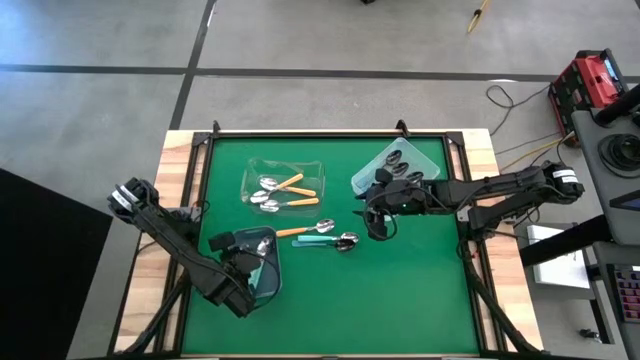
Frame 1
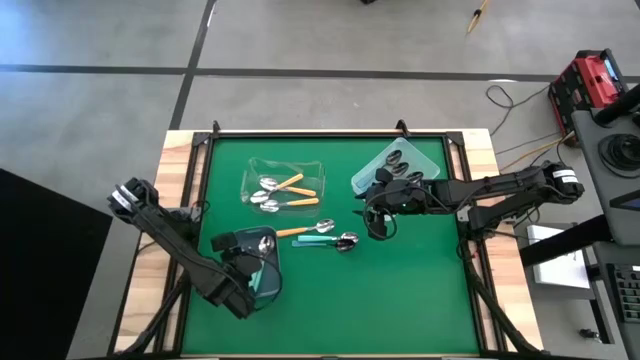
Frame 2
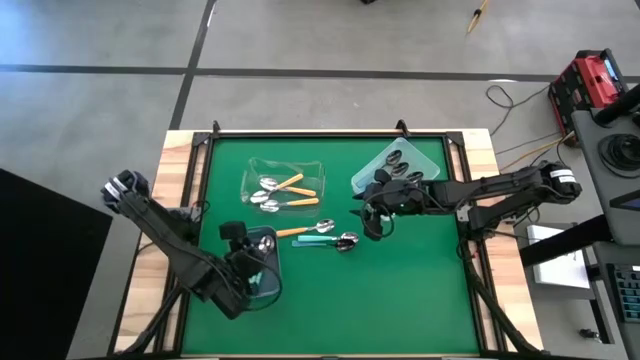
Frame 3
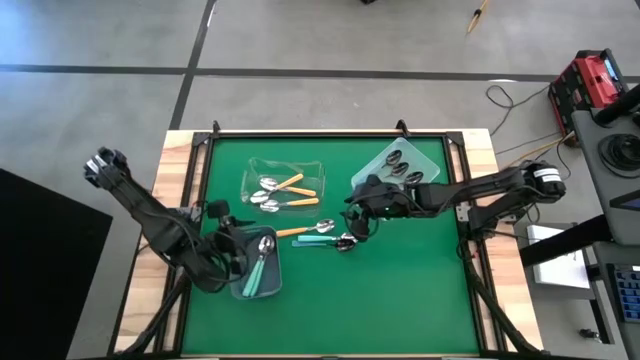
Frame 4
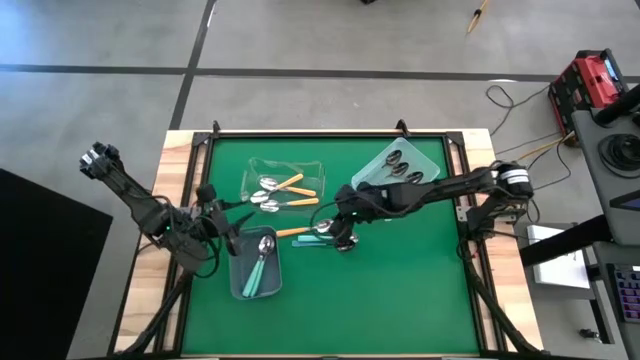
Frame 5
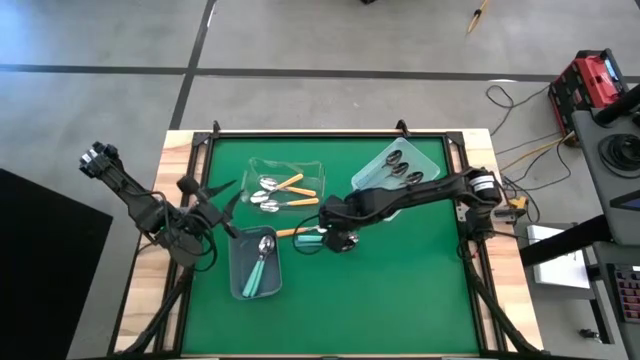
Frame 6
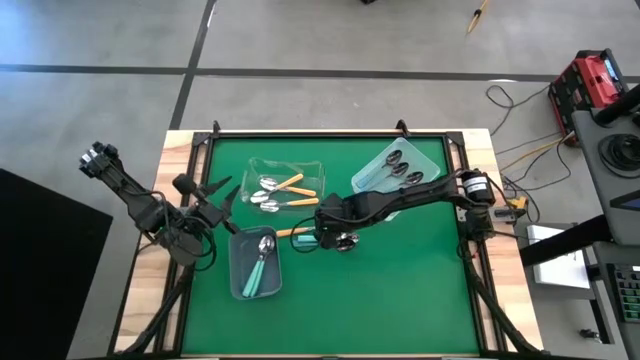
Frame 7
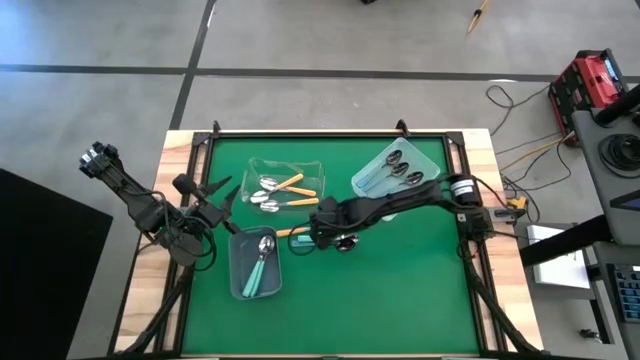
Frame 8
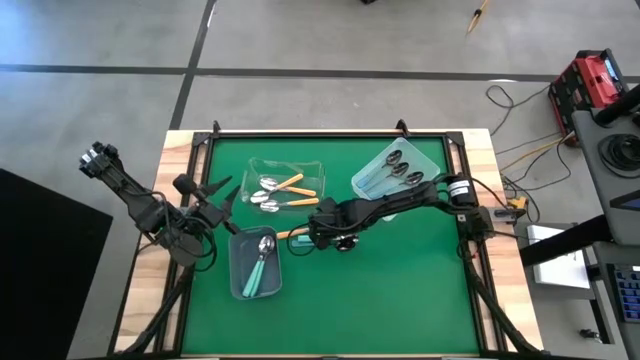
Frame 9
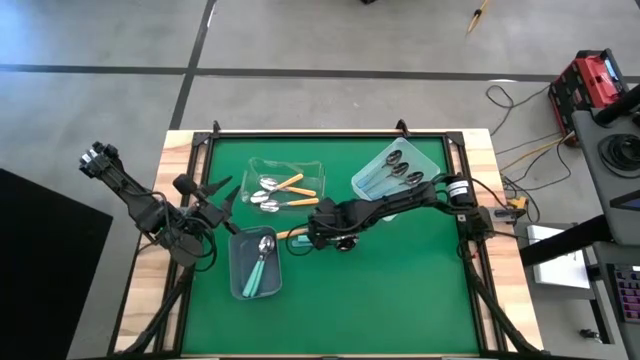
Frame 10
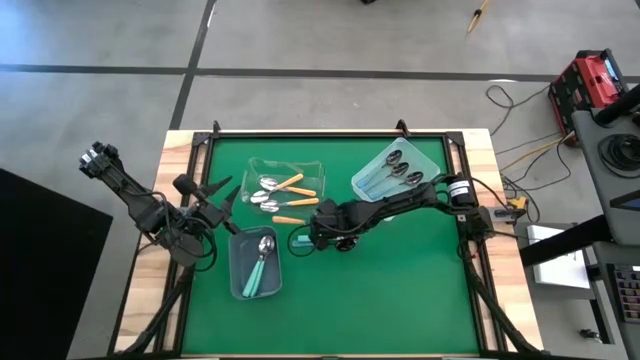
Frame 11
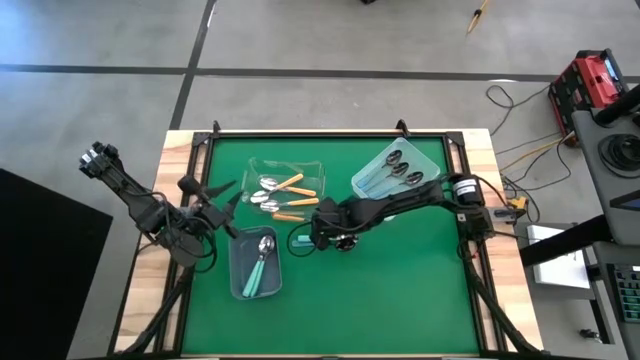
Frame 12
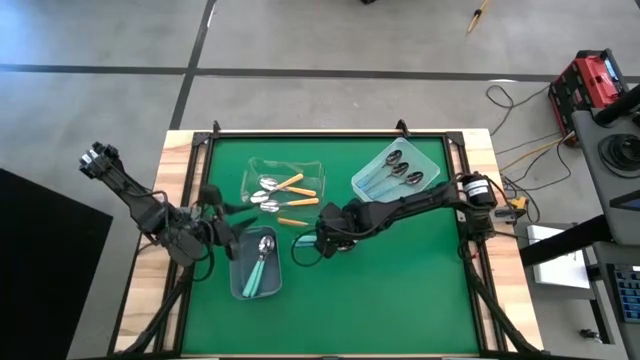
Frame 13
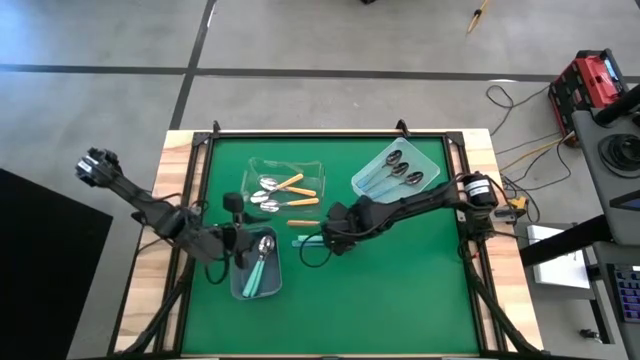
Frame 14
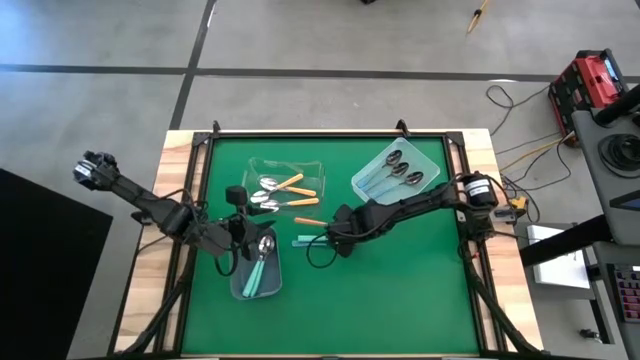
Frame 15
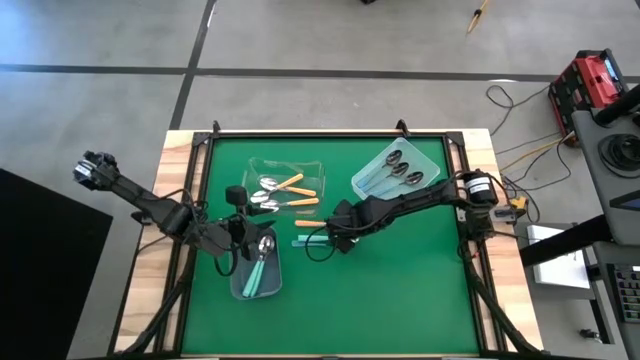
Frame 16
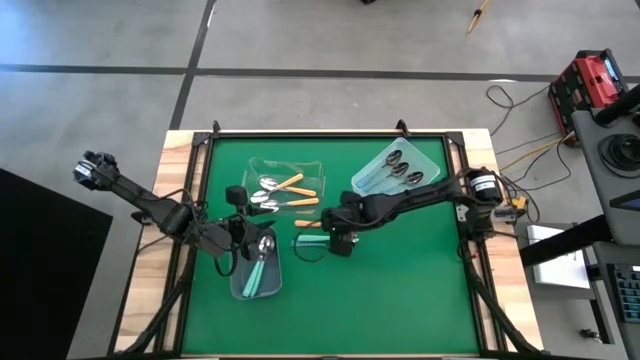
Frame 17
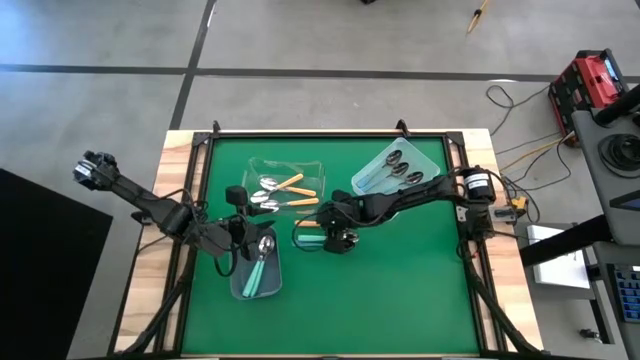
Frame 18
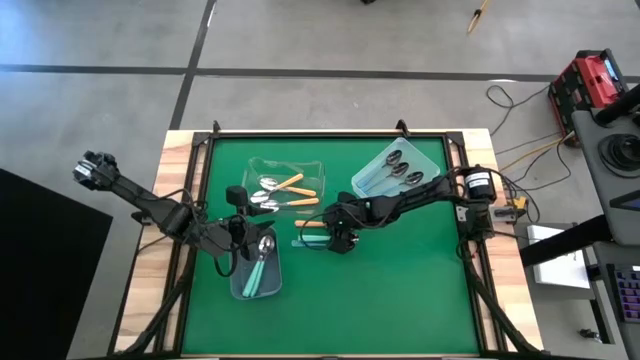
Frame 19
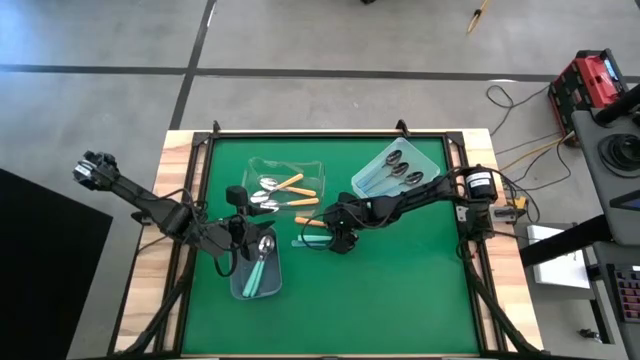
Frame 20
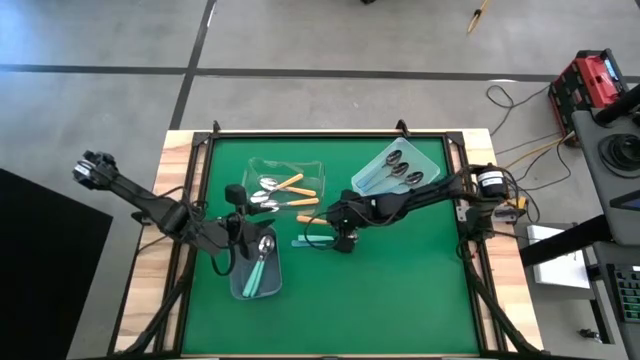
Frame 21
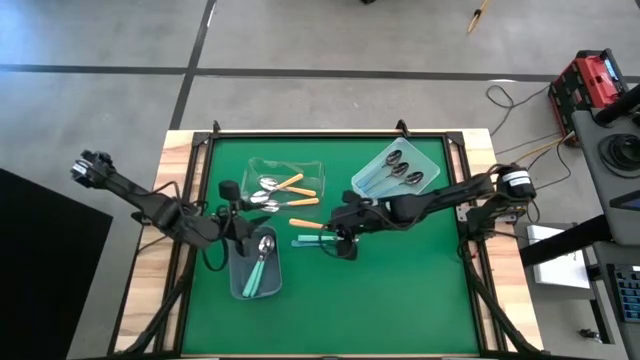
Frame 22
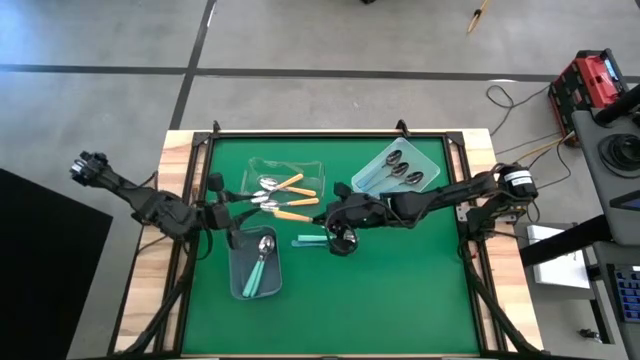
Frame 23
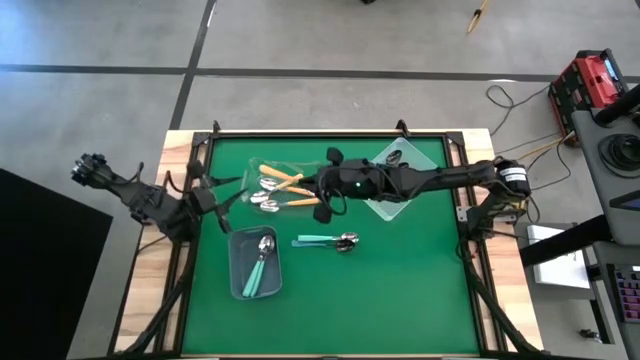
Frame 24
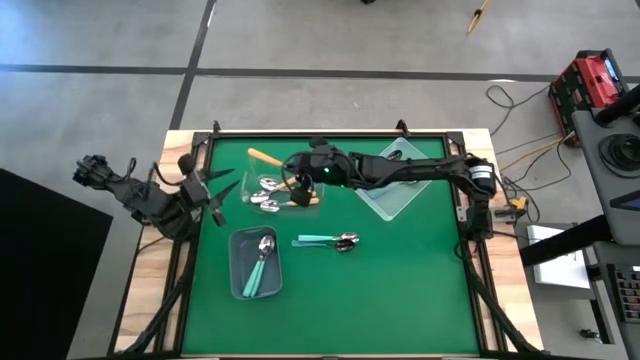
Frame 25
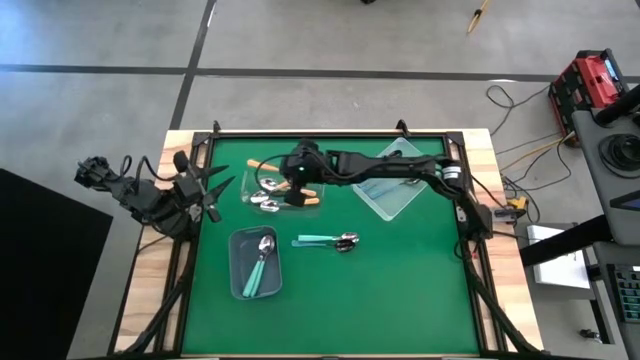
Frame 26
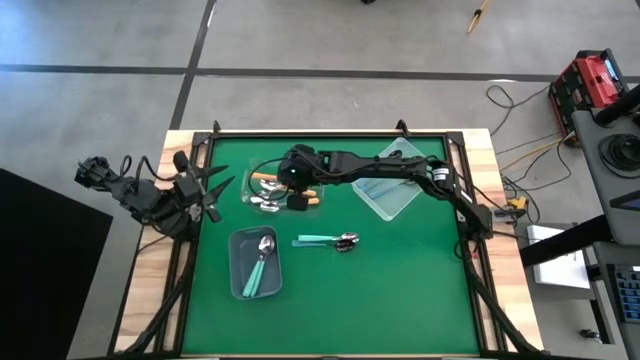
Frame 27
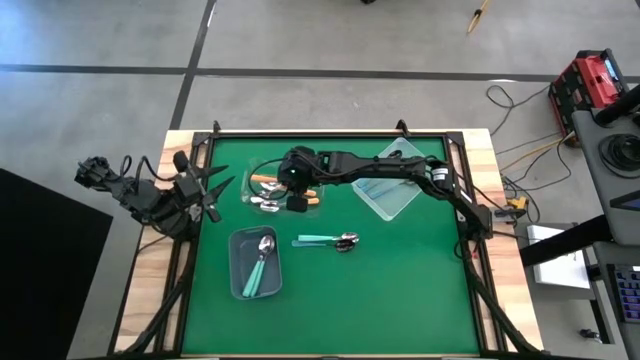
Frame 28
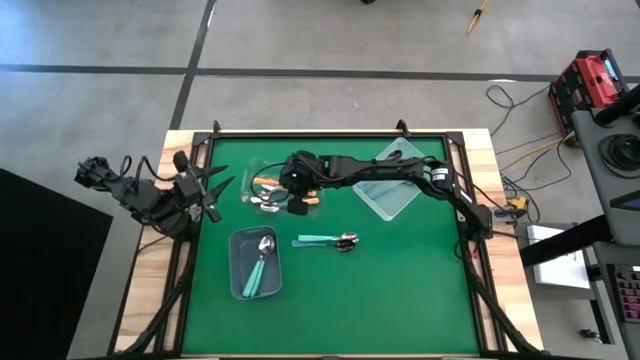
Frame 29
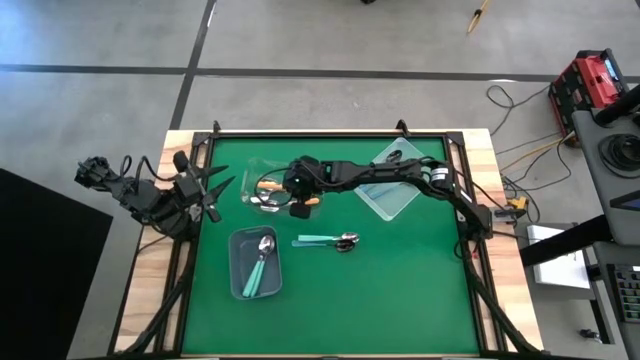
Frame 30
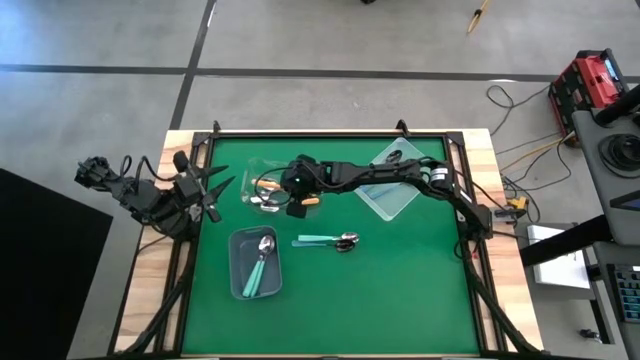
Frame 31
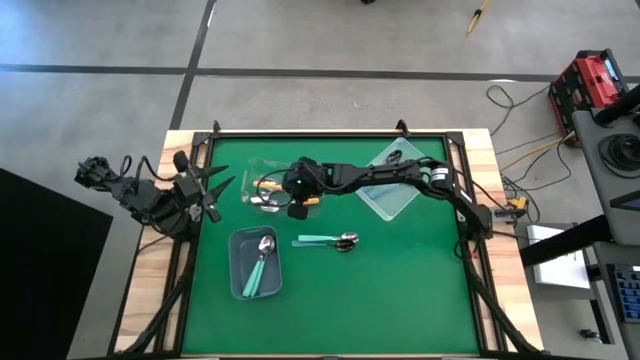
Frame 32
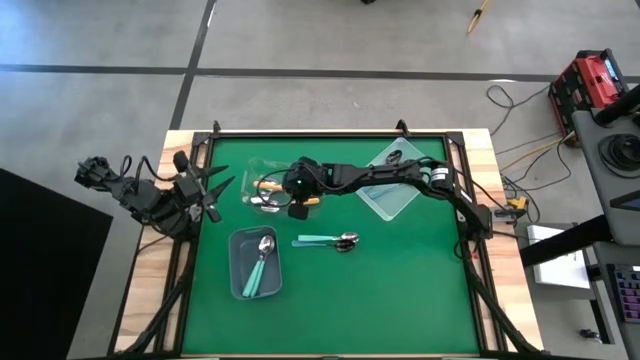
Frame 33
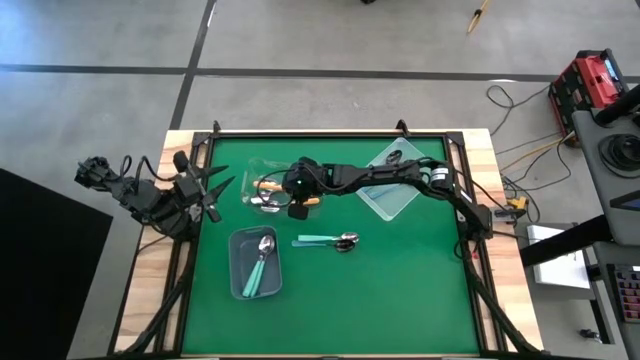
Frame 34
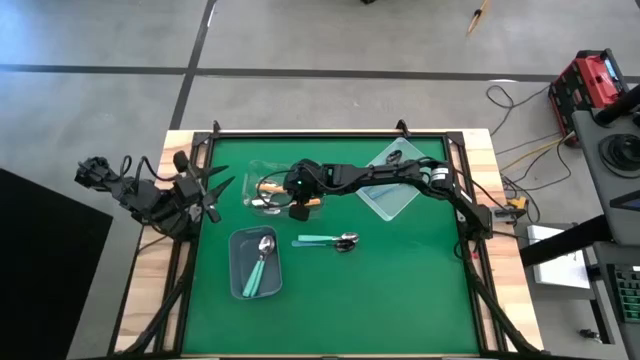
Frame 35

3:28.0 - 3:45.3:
Task: Sort silverware by color (type)
Put the orange spoon into the transparent bin
